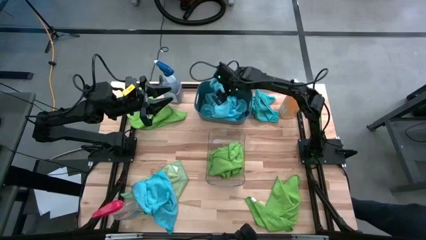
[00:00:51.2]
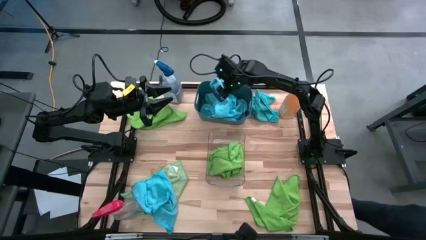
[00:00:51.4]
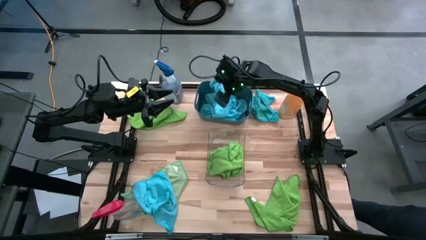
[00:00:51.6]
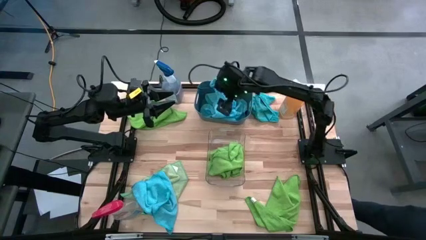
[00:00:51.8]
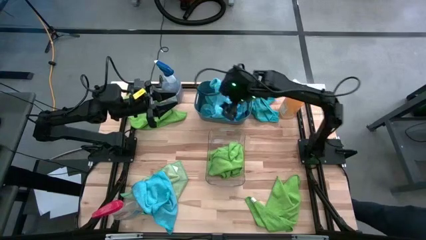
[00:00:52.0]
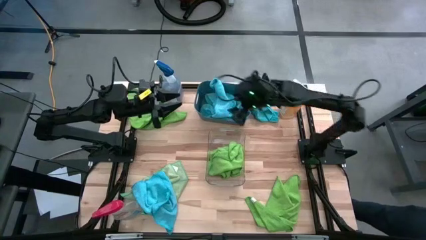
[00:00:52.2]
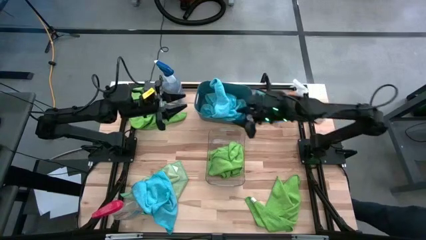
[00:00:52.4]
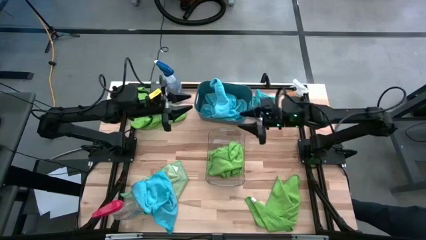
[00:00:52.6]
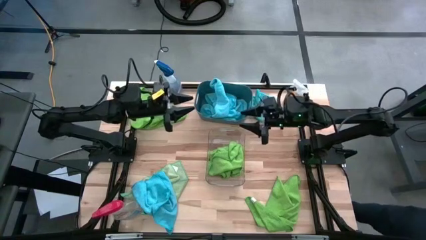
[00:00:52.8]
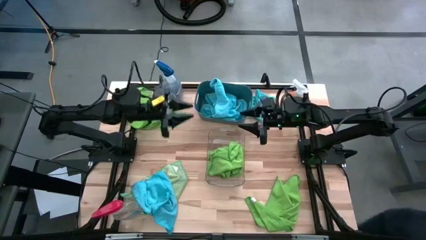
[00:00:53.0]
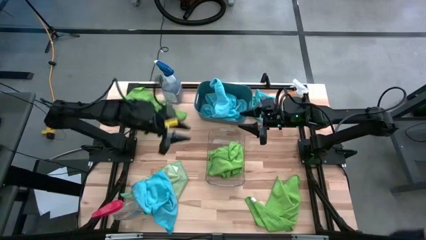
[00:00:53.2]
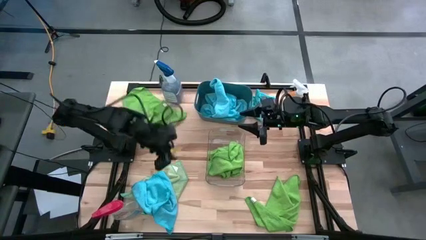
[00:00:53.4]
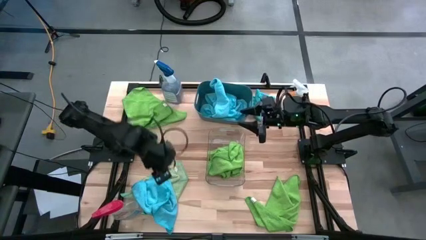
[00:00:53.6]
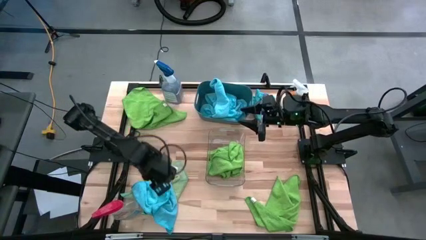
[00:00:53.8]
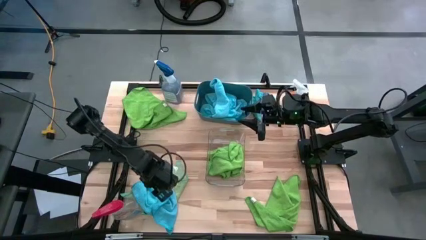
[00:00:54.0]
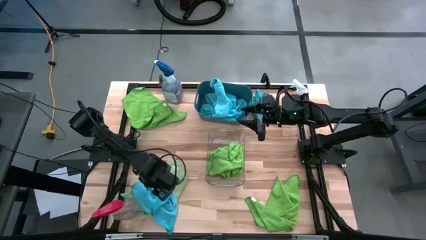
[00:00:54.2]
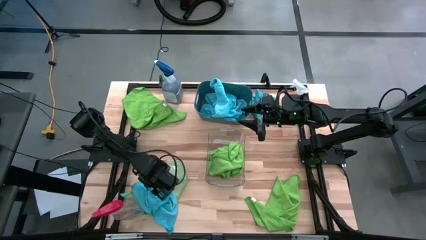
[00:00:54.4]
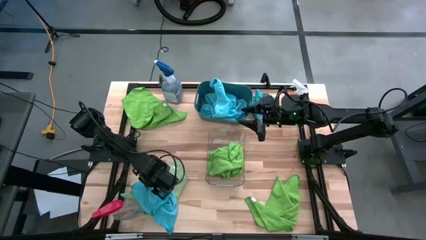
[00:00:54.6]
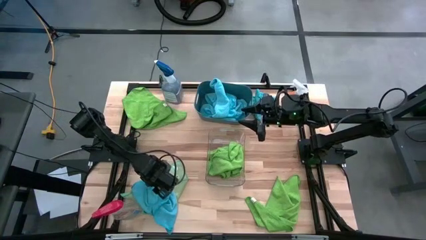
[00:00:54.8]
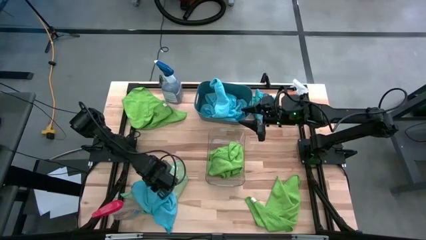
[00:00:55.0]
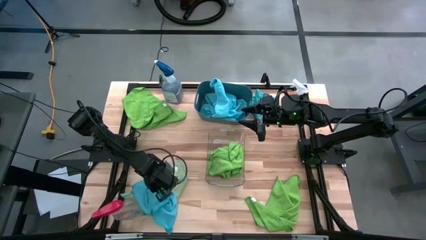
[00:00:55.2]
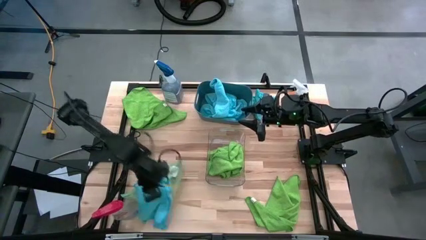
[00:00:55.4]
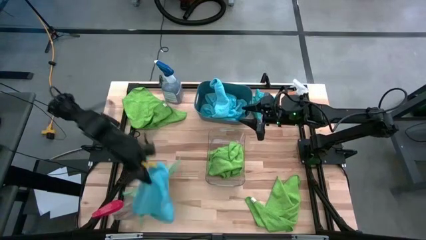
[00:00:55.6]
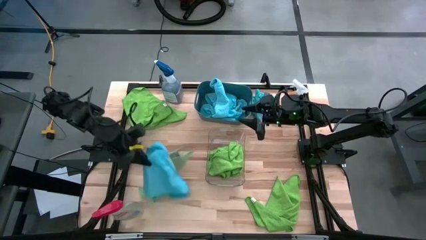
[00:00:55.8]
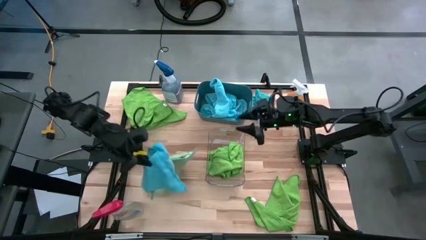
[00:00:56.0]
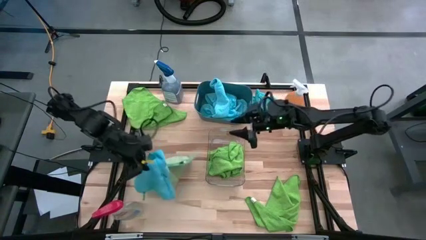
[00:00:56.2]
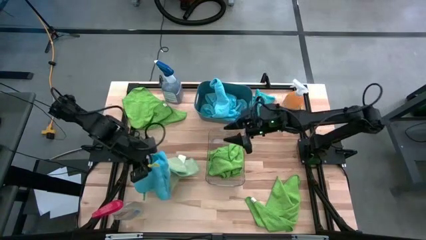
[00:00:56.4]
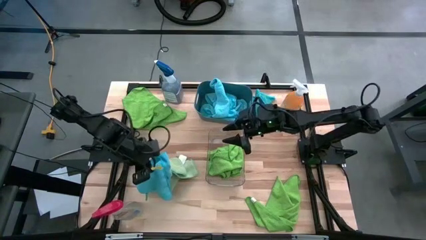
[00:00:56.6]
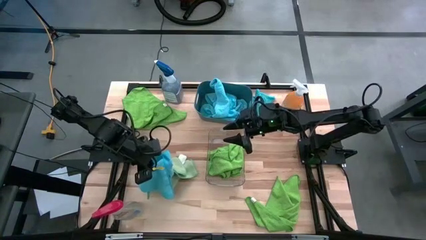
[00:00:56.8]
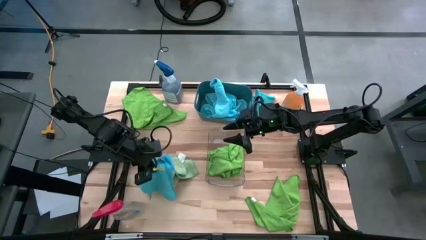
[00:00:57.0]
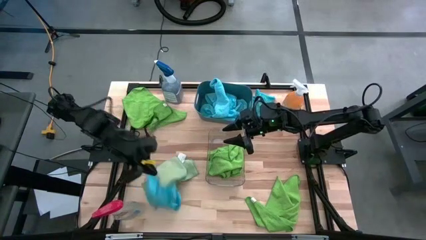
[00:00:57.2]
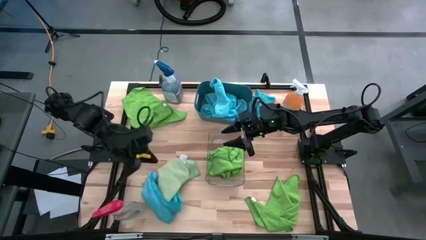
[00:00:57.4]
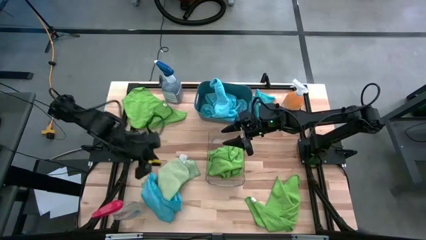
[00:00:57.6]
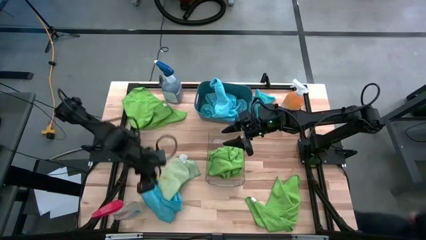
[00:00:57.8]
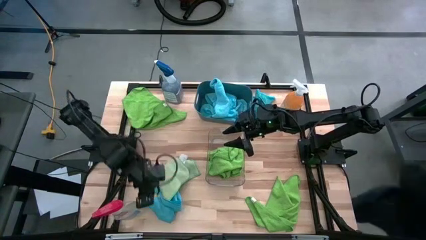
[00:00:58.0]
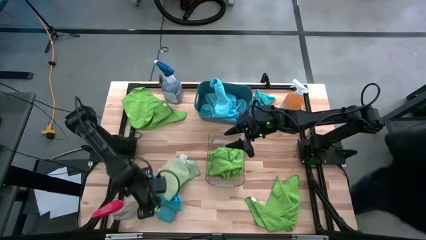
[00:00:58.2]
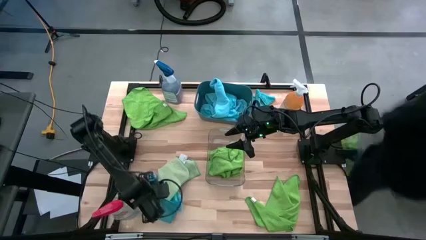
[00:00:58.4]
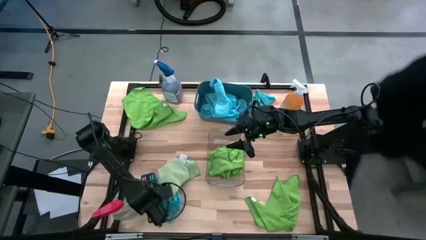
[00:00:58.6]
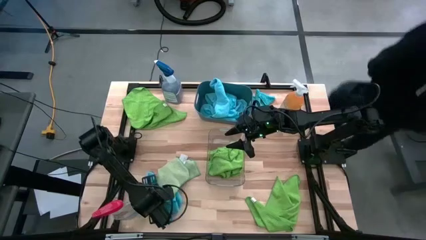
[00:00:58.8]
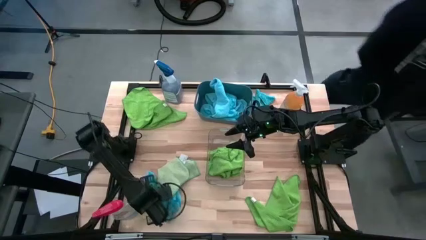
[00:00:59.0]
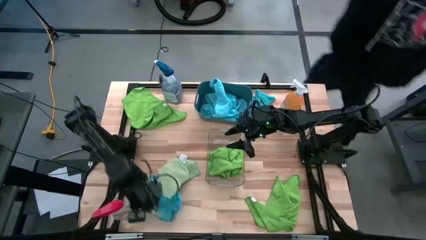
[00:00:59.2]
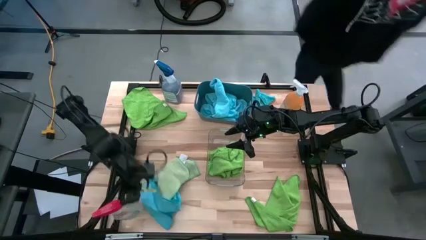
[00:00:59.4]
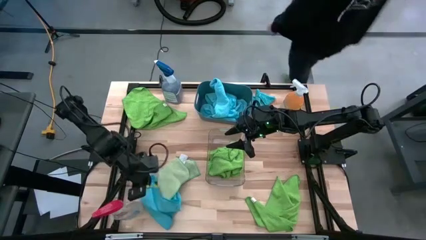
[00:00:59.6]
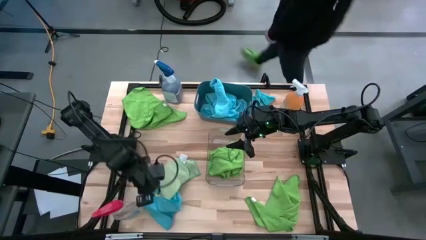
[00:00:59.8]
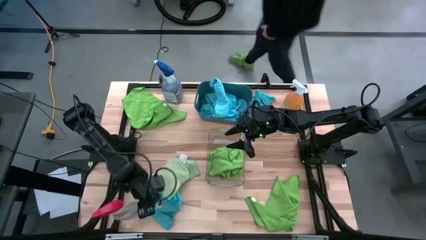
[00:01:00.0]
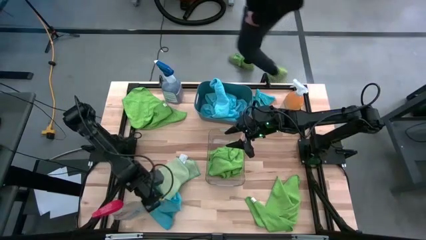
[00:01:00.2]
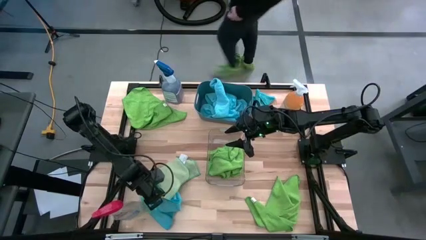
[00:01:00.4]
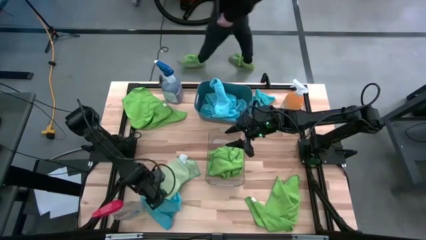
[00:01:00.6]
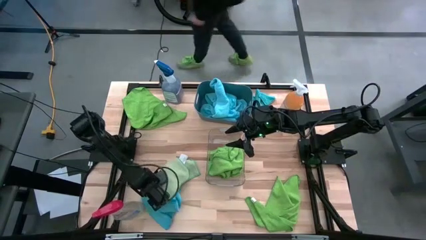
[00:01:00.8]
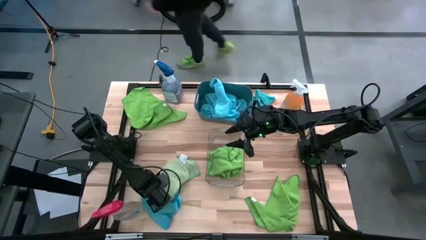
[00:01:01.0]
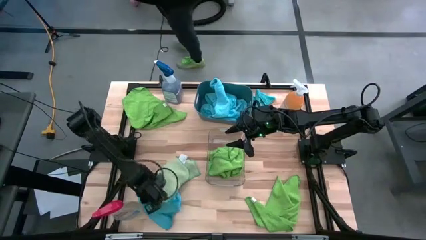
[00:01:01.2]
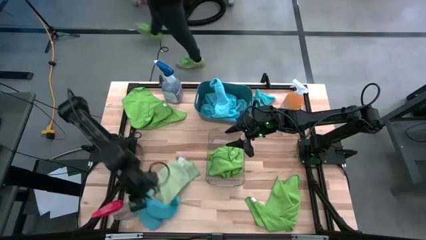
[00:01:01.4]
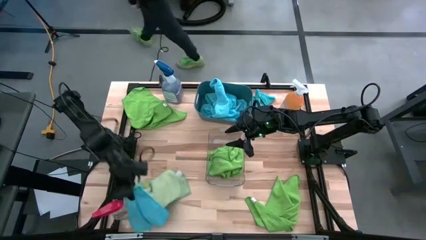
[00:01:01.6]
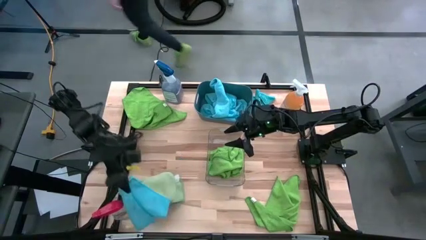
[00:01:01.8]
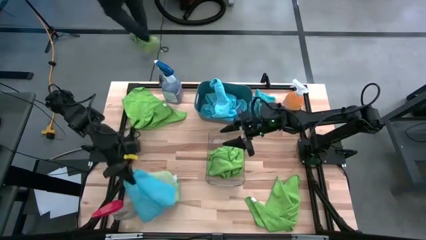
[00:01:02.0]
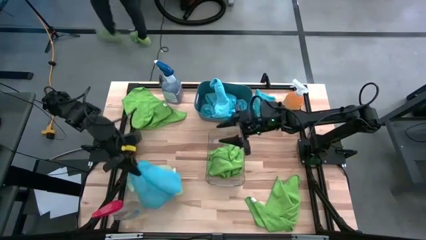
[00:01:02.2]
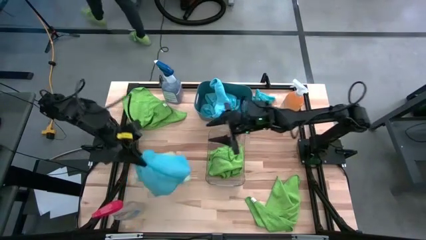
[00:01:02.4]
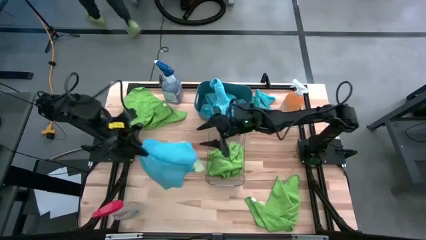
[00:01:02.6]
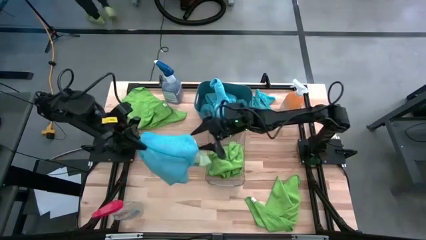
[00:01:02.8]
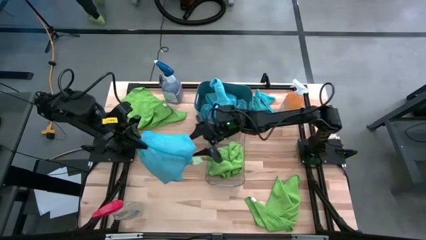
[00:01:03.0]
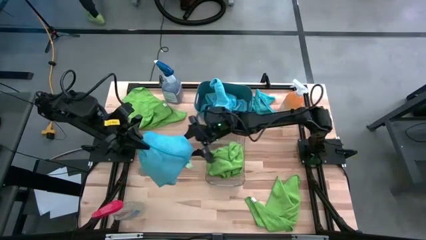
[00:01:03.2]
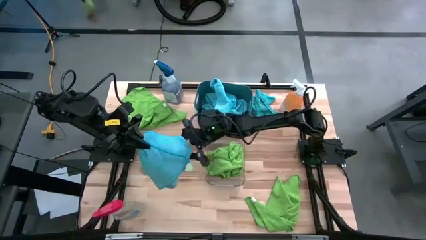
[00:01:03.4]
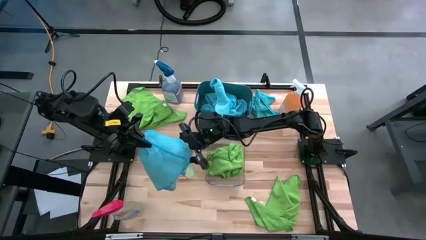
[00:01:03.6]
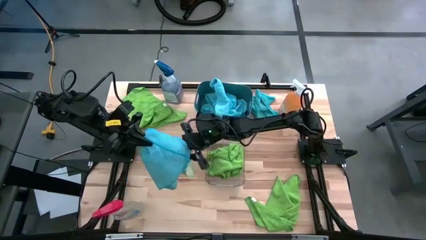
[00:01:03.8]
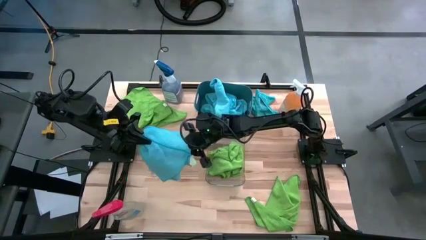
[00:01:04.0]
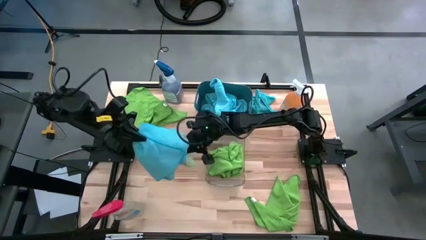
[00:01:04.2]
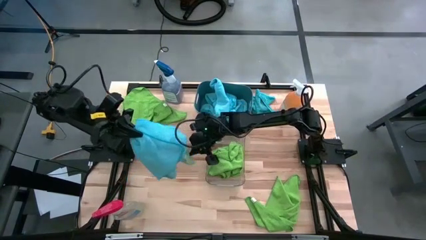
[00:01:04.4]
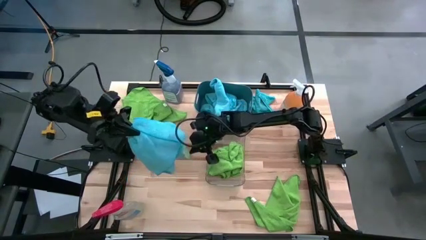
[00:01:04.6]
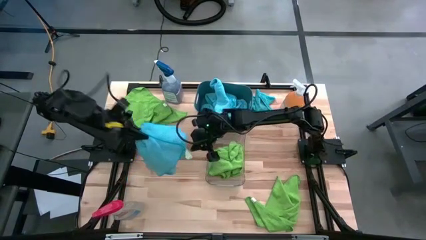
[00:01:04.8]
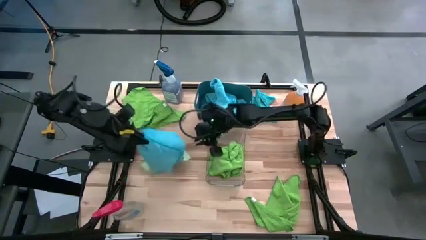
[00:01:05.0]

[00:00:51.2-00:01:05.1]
Task: Sort microfiber towel by color & place in baskets
Put the blue microfiber towel into the blue bin
